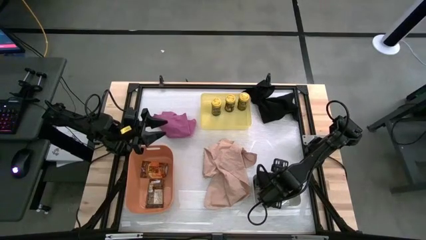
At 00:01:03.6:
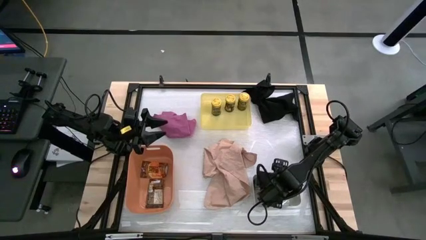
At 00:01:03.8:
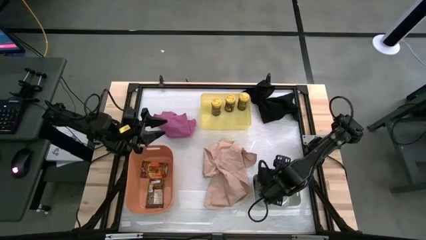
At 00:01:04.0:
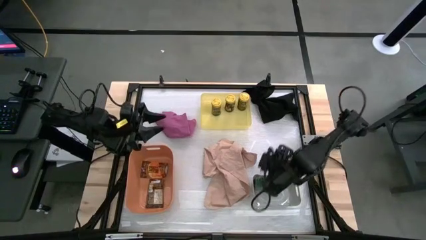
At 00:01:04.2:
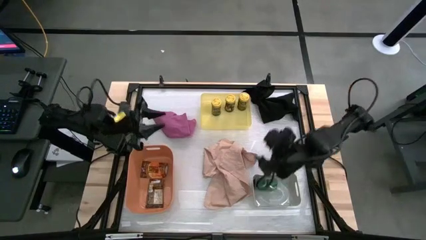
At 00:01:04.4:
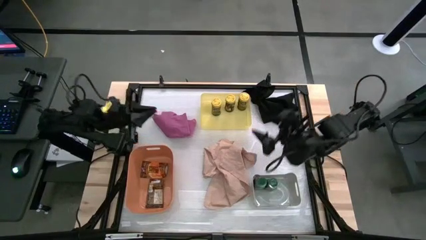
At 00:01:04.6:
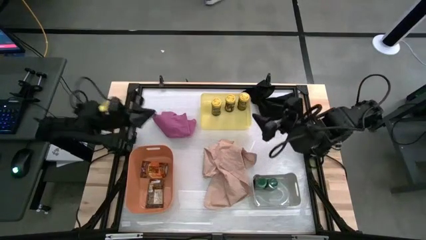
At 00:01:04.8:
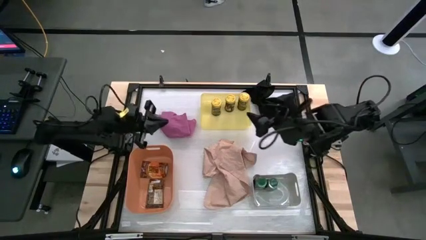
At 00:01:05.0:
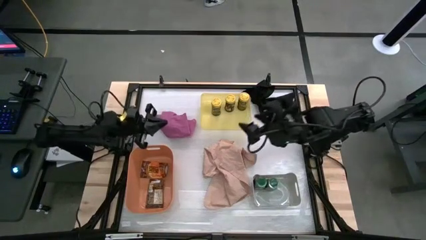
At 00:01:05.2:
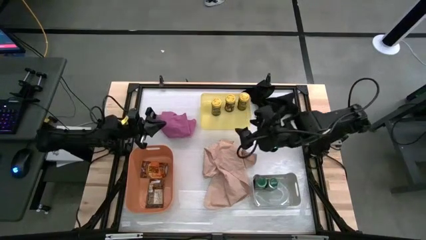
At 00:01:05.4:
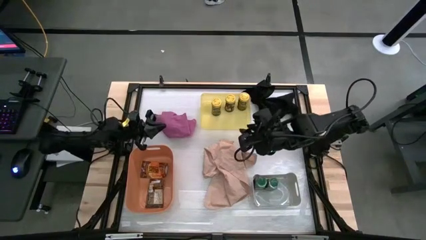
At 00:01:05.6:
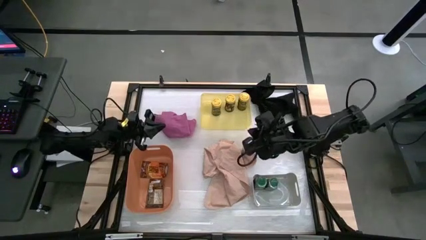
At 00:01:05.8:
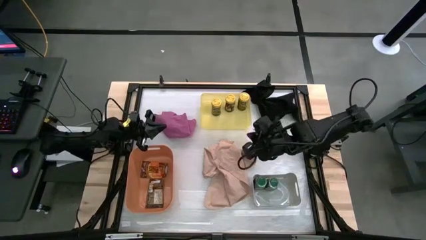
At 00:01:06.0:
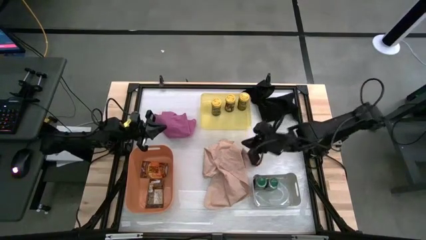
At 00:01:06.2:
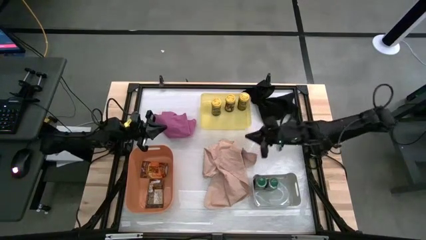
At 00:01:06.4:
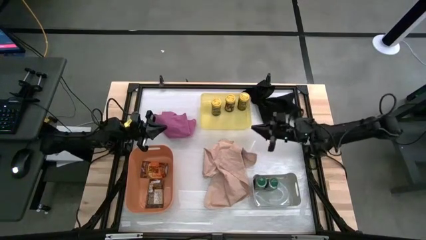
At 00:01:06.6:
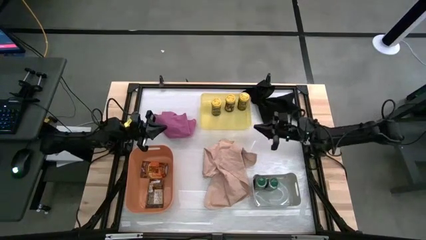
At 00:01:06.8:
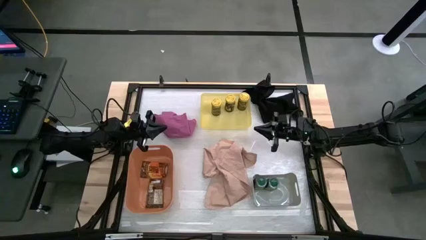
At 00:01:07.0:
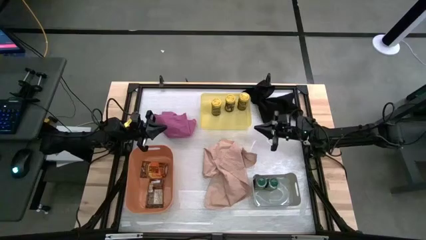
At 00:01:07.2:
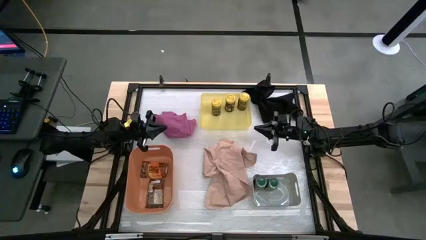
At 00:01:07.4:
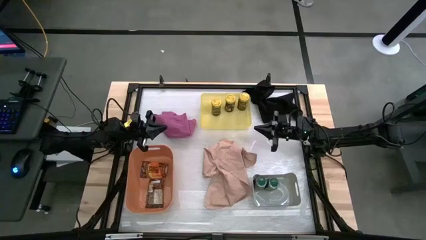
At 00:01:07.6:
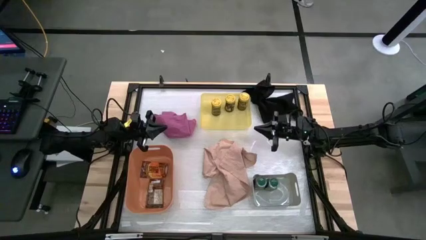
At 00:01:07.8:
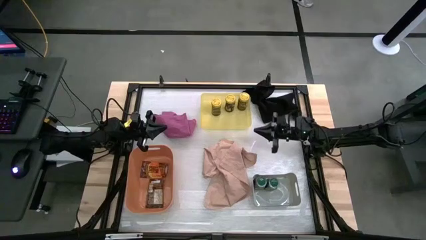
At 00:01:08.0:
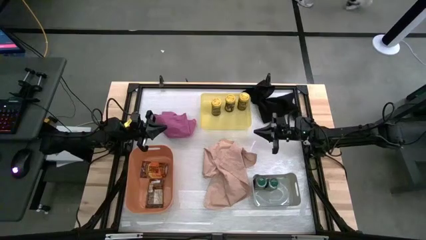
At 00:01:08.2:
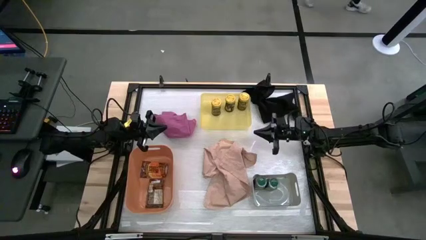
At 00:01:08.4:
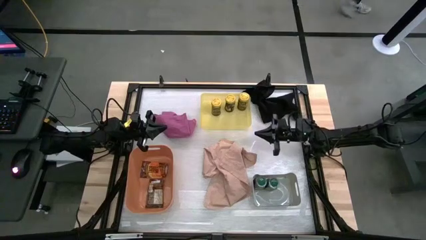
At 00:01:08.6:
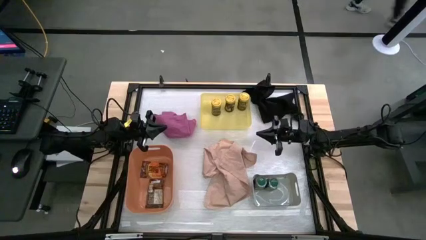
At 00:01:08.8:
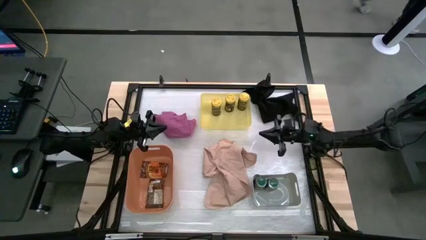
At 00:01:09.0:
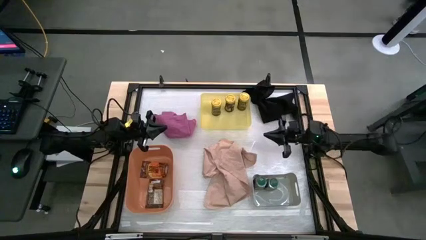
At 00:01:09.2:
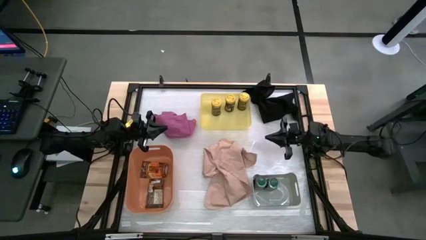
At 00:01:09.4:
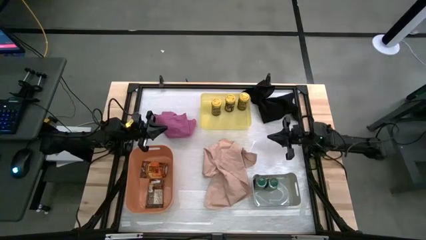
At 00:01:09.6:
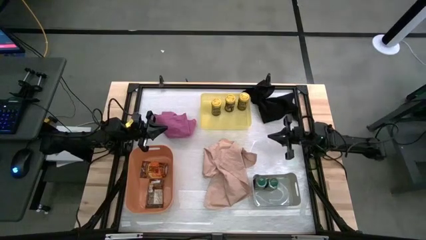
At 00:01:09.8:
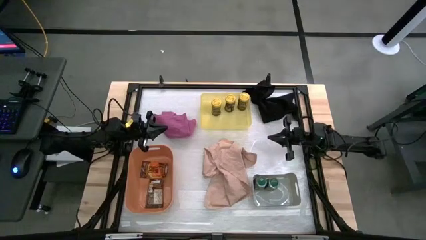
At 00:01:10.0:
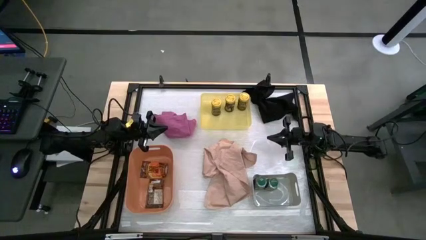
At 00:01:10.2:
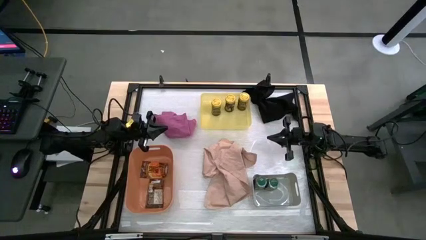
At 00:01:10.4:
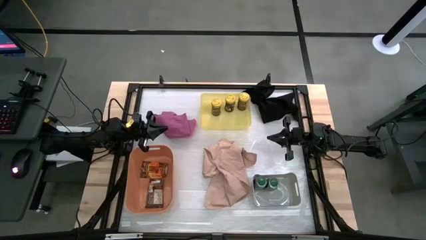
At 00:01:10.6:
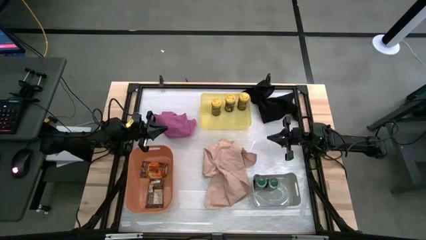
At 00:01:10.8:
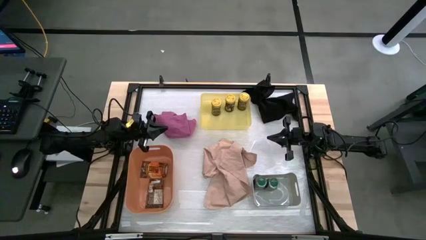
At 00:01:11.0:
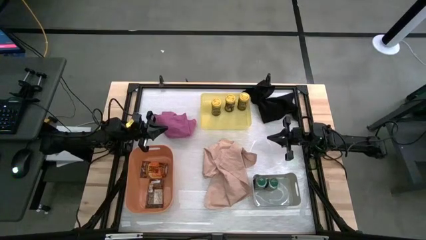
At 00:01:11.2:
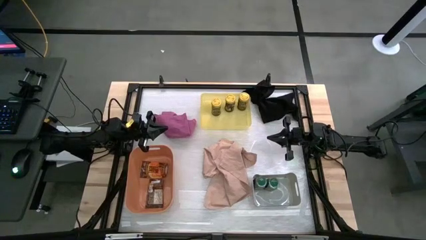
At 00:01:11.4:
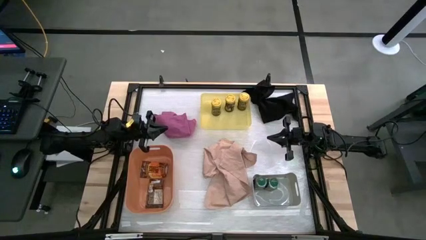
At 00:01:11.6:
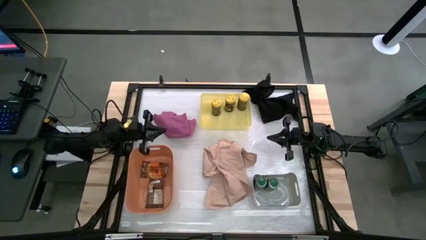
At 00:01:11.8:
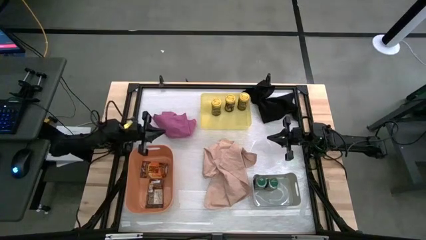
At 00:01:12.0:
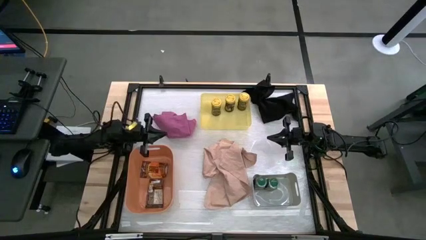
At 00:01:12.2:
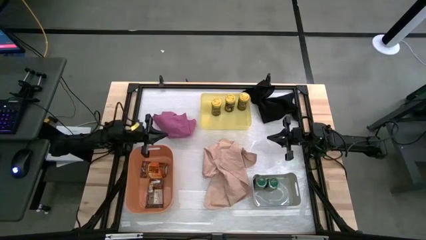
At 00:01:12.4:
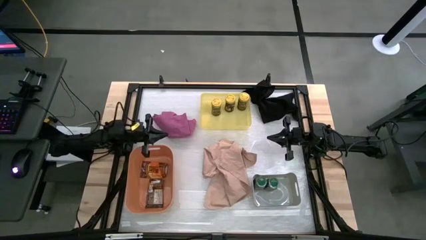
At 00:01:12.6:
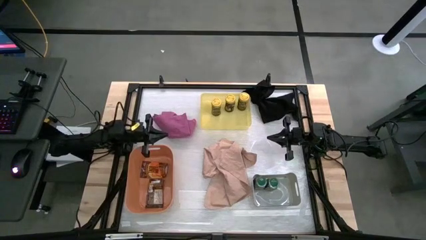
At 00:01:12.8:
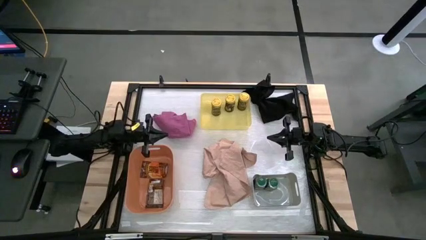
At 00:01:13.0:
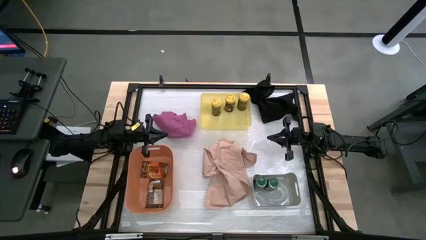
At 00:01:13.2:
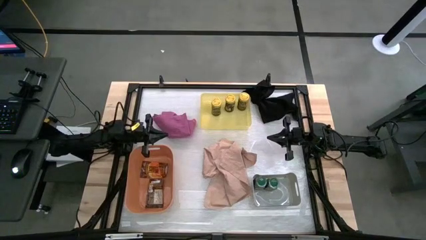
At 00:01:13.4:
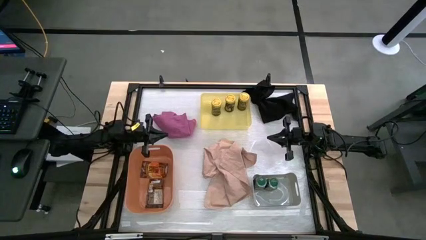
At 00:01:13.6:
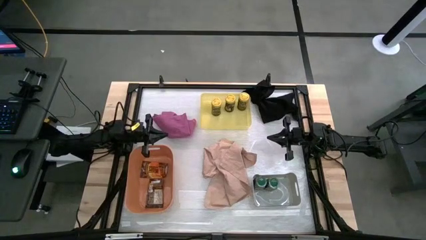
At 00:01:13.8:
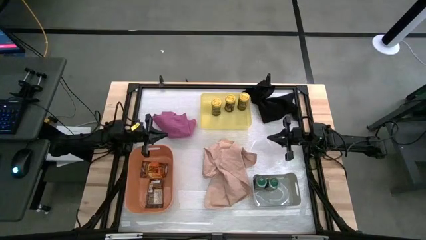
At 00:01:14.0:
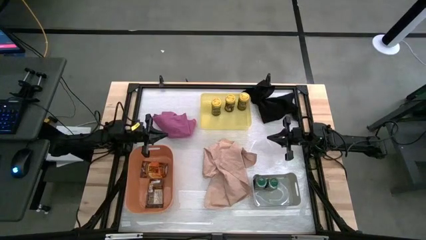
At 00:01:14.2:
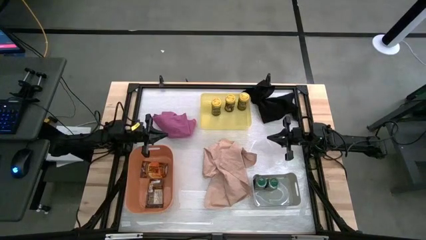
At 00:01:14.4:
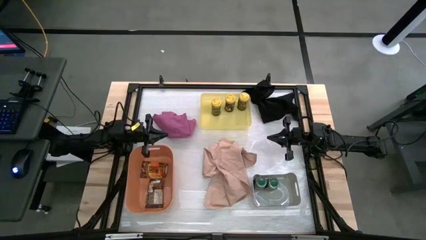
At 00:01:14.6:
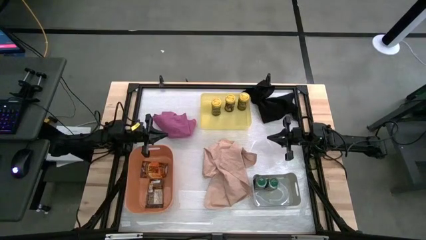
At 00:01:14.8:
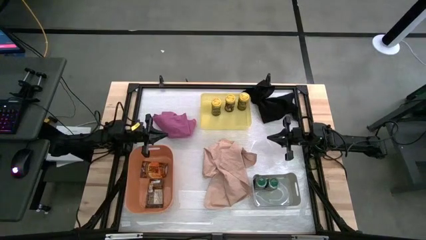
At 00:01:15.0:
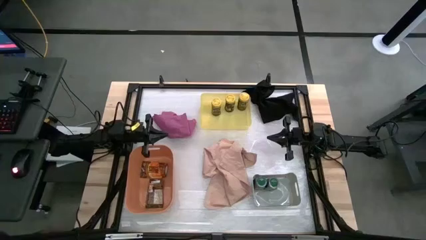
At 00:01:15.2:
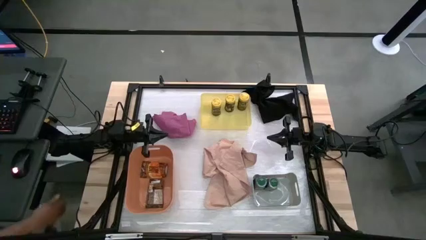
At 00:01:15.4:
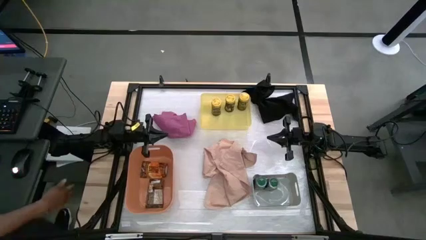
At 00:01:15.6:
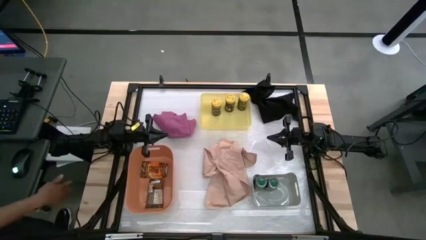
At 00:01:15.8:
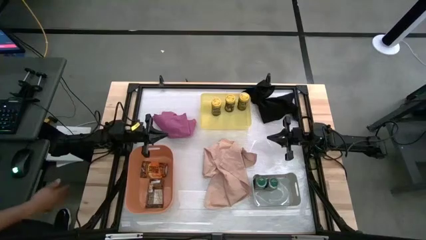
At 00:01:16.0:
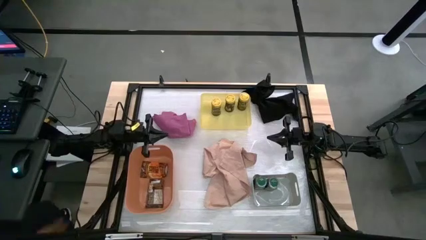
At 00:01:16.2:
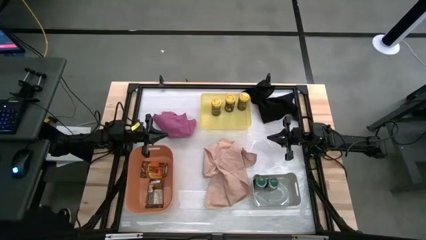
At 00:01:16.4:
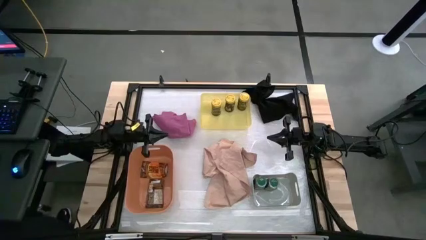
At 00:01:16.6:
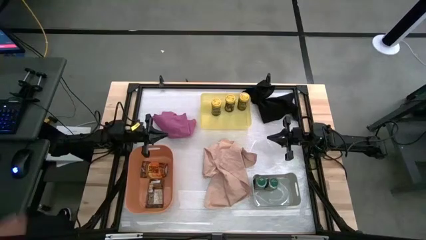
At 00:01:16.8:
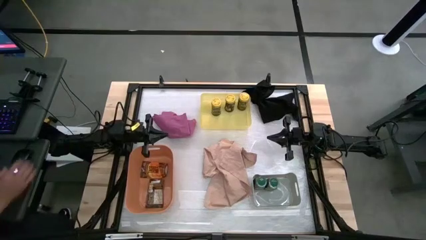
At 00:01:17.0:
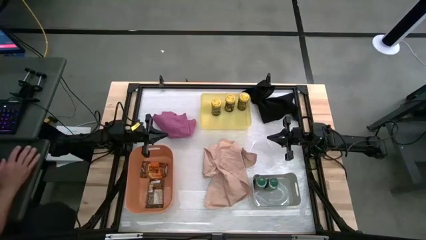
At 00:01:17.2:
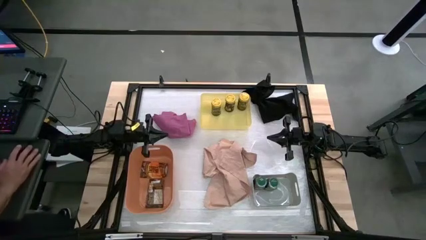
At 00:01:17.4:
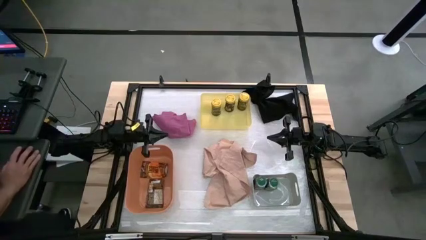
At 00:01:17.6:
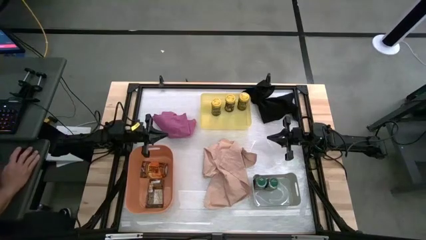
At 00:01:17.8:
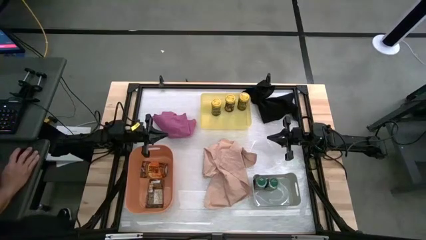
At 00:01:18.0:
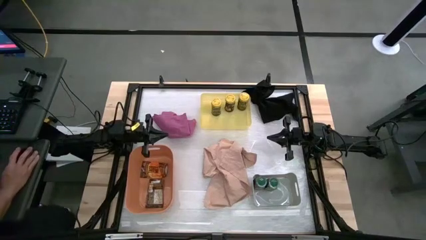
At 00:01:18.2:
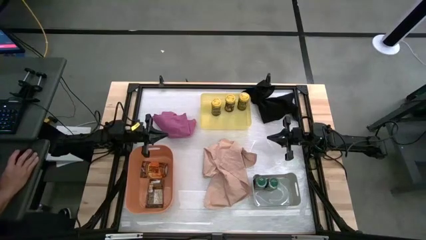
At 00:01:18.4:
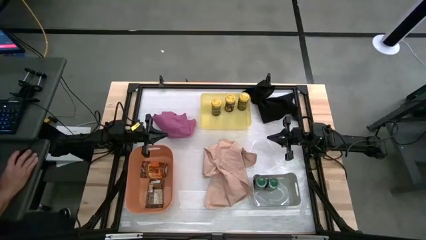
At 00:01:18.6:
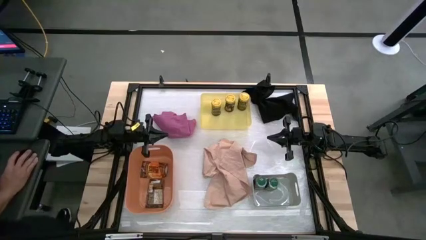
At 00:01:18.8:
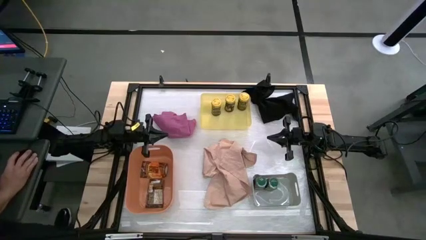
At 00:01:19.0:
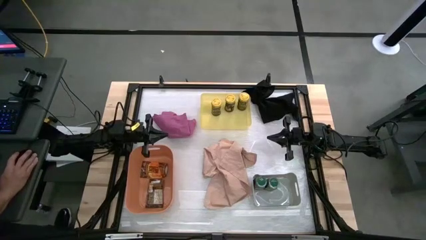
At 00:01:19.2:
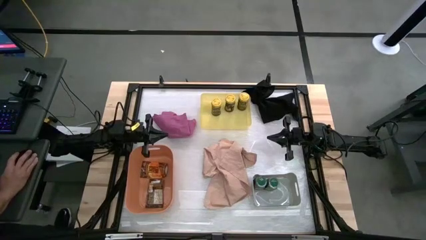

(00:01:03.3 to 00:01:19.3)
Task: Sort spices by type
Return to Home Position
